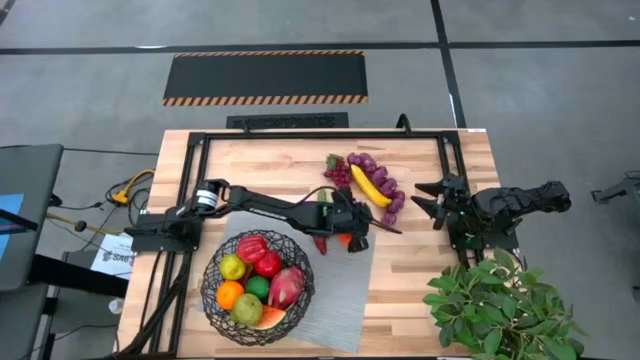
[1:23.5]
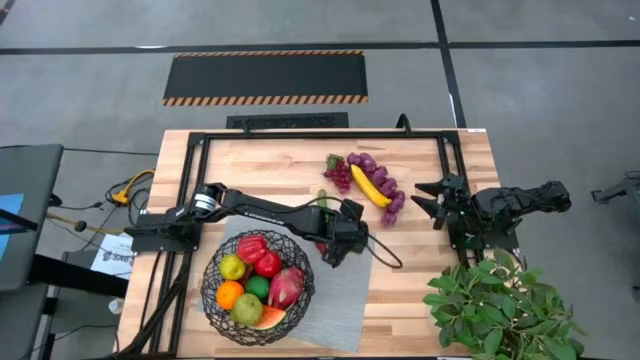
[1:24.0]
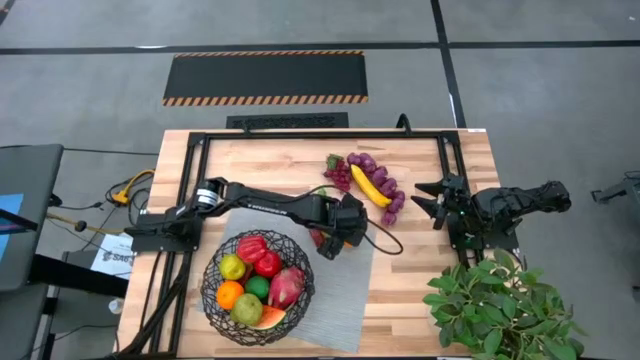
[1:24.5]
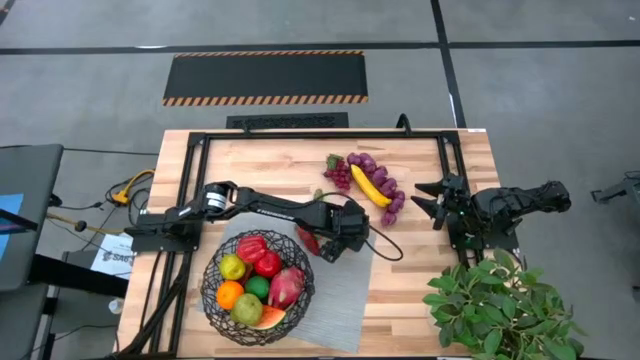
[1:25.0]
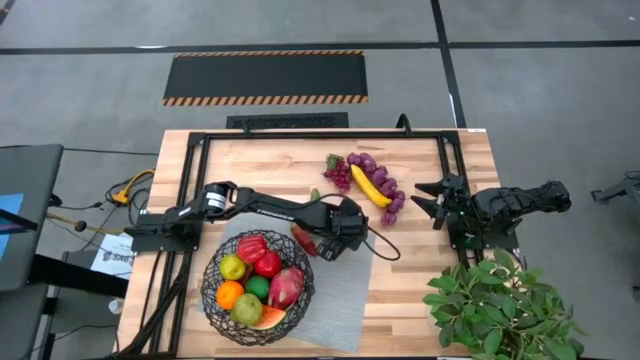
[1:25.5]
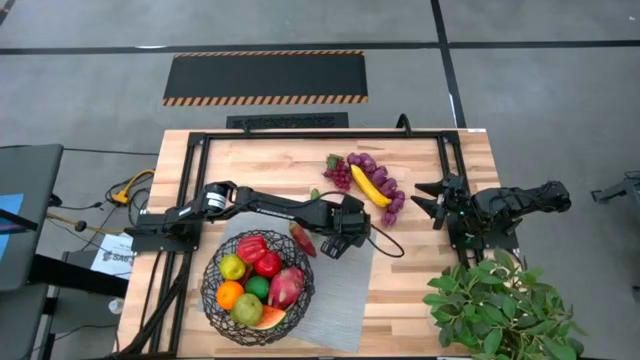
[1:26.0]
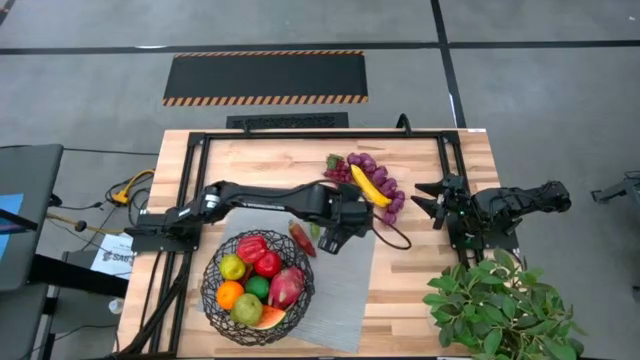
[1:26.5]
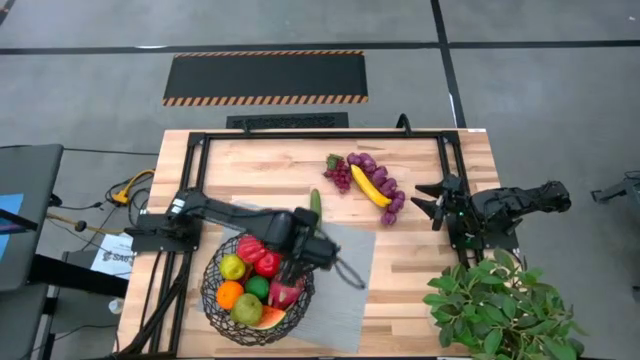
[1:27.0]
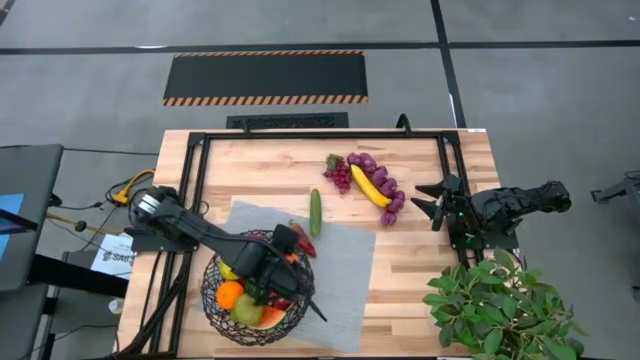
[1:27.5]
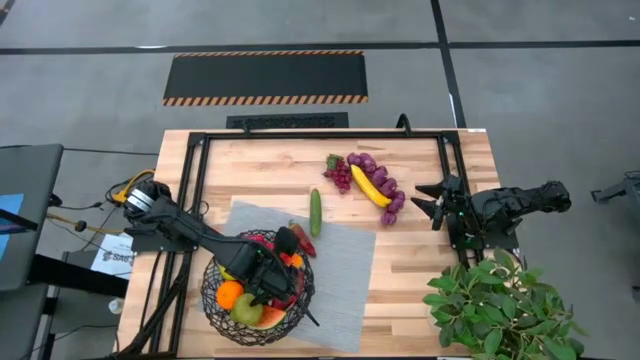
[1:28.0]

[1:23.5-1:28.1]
Task: Build produce basket
Put the orange mango into the mesh basket

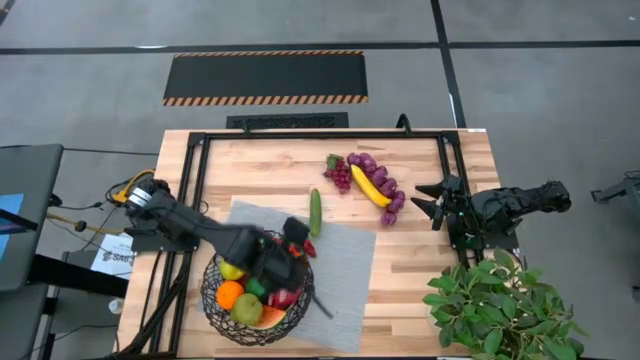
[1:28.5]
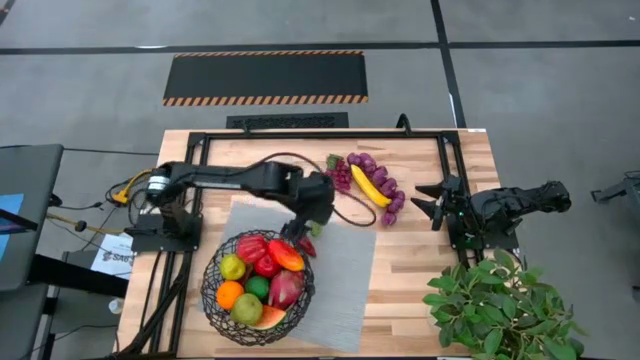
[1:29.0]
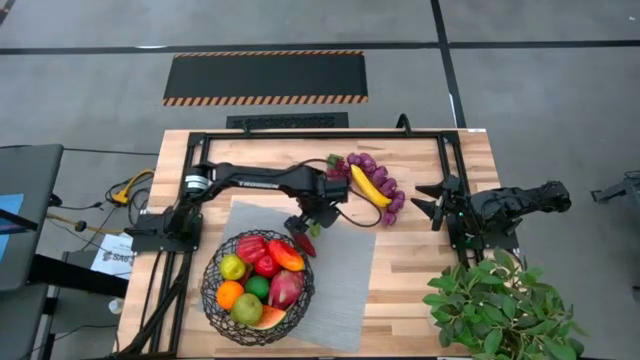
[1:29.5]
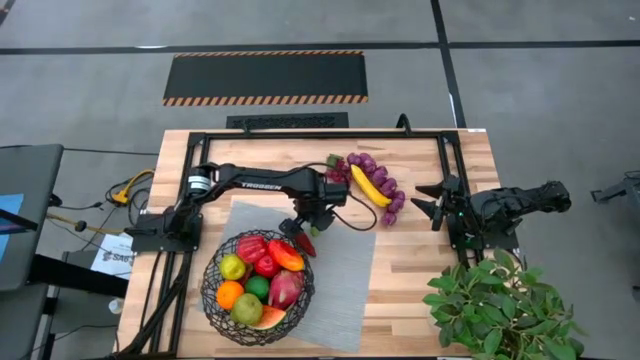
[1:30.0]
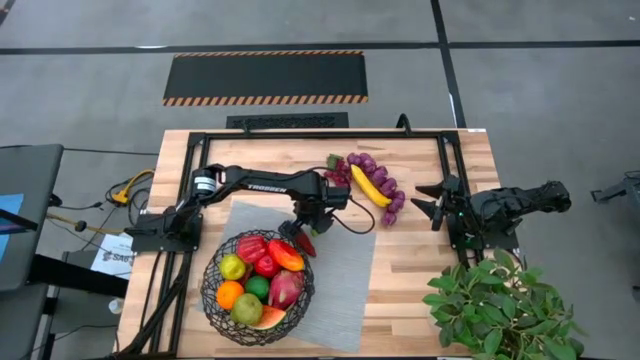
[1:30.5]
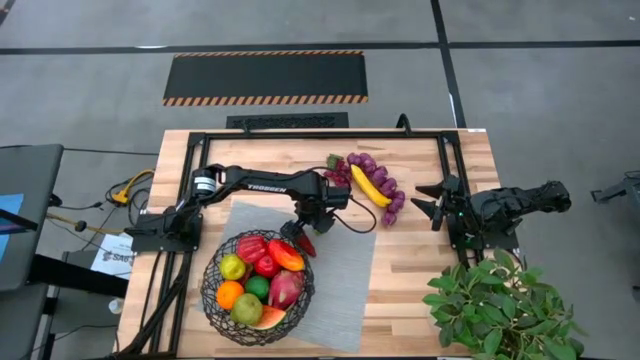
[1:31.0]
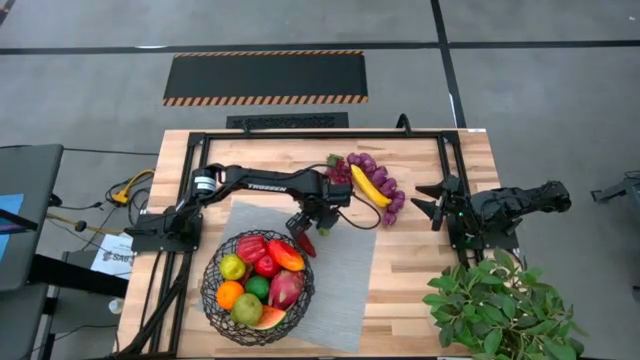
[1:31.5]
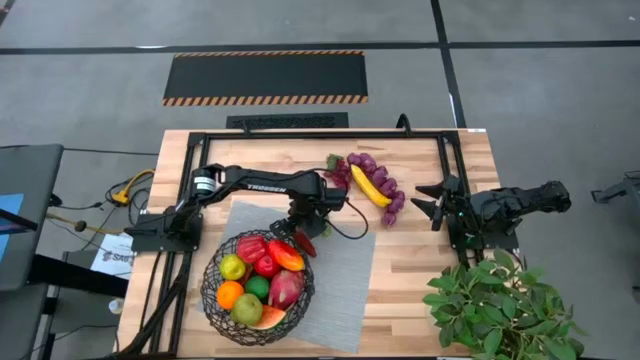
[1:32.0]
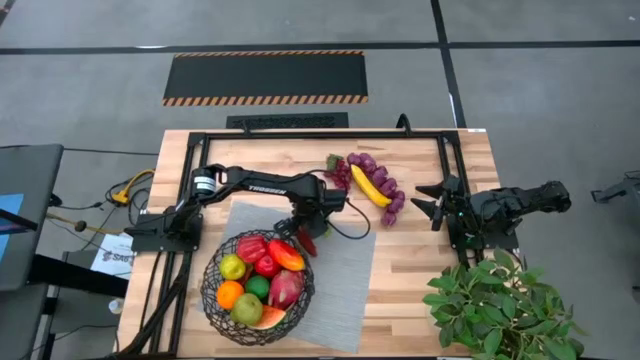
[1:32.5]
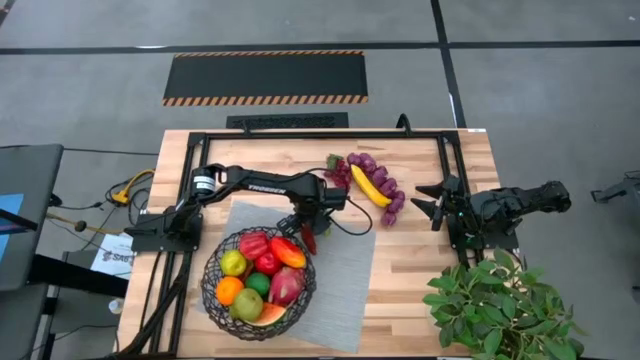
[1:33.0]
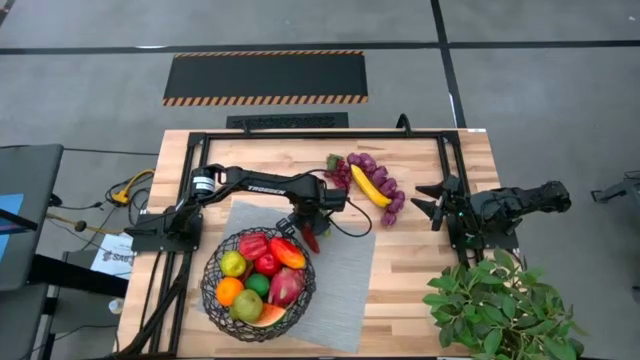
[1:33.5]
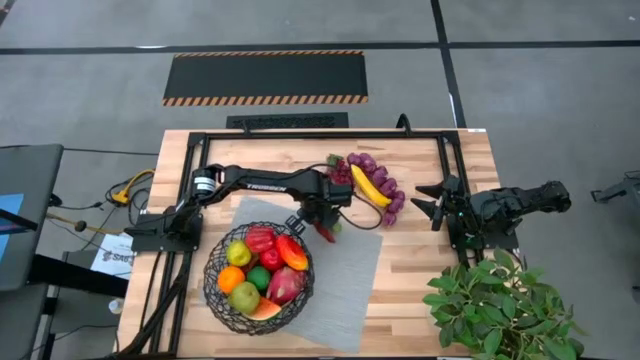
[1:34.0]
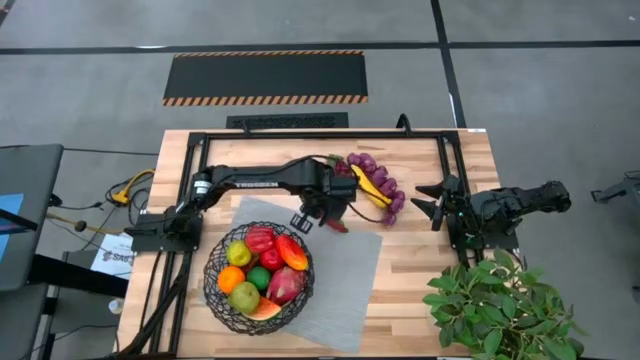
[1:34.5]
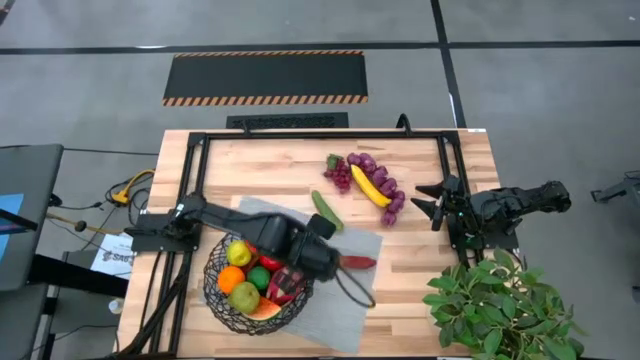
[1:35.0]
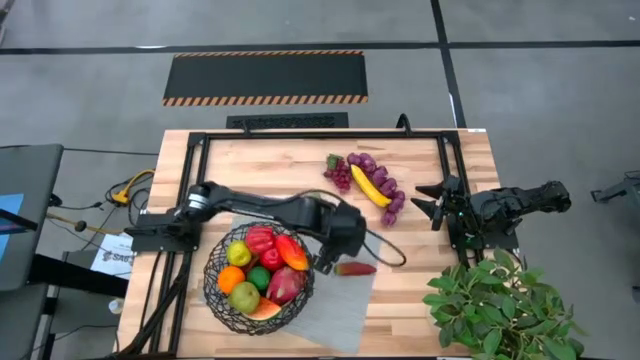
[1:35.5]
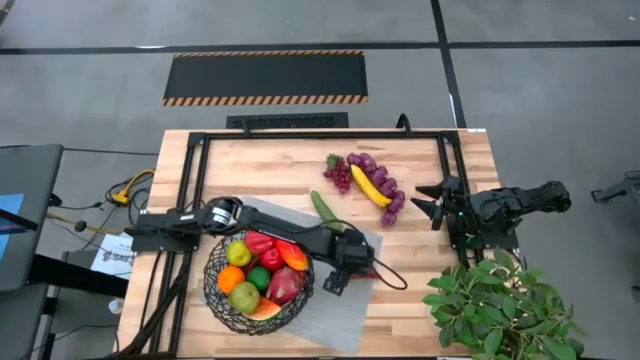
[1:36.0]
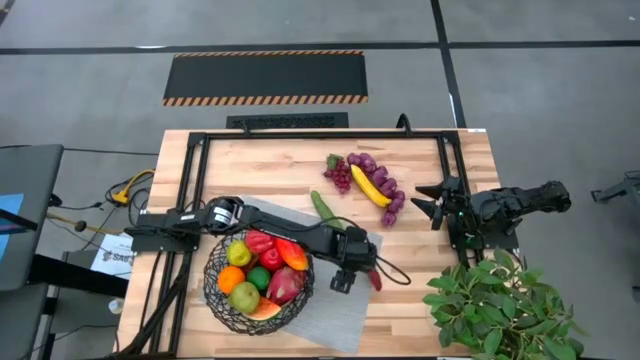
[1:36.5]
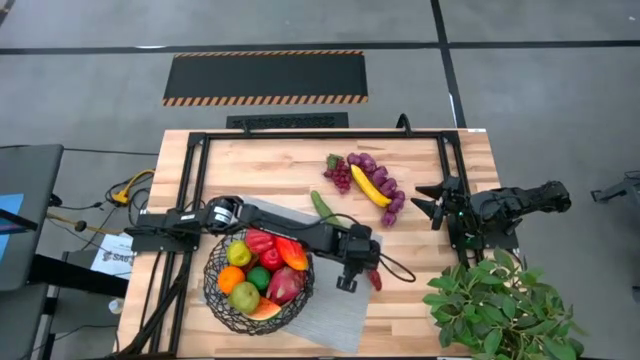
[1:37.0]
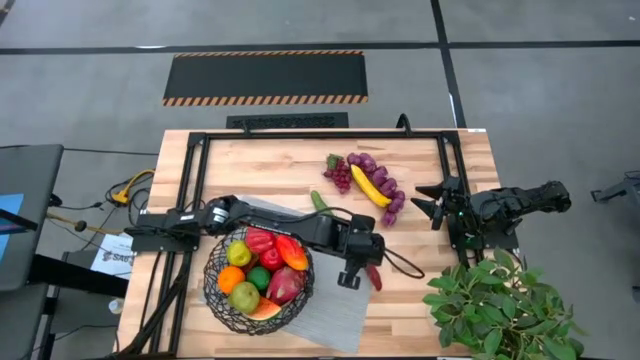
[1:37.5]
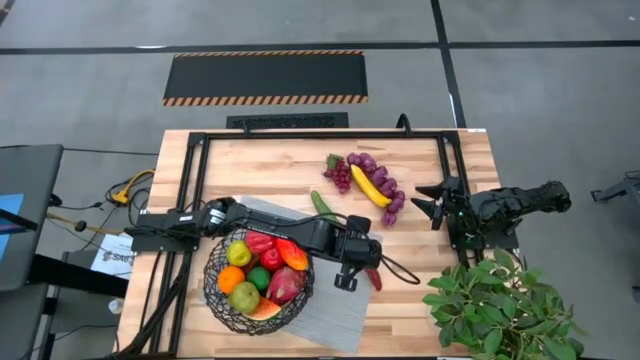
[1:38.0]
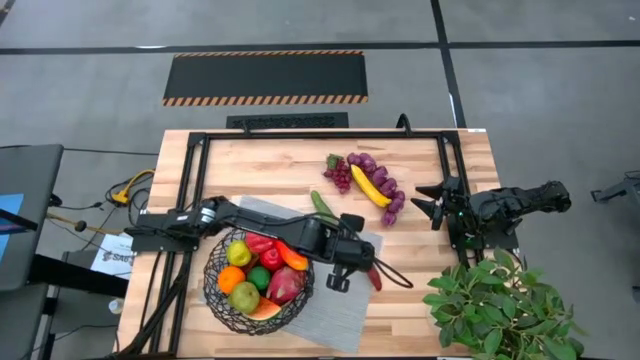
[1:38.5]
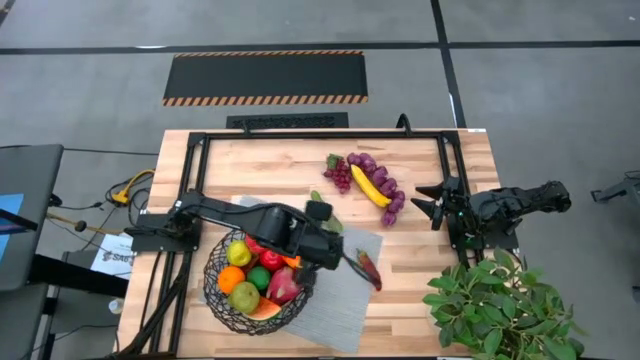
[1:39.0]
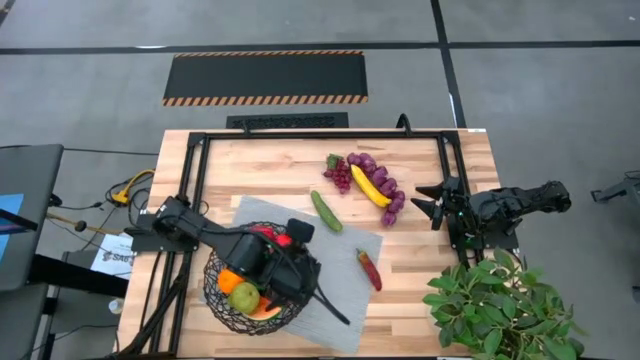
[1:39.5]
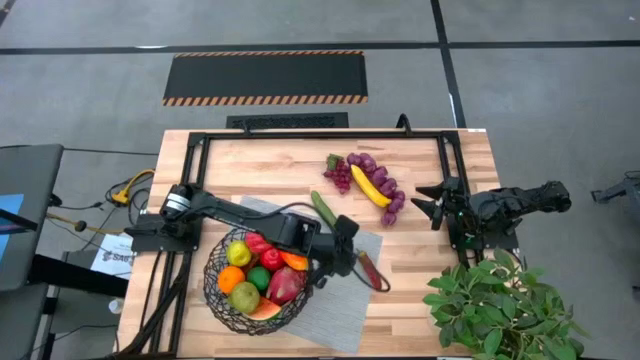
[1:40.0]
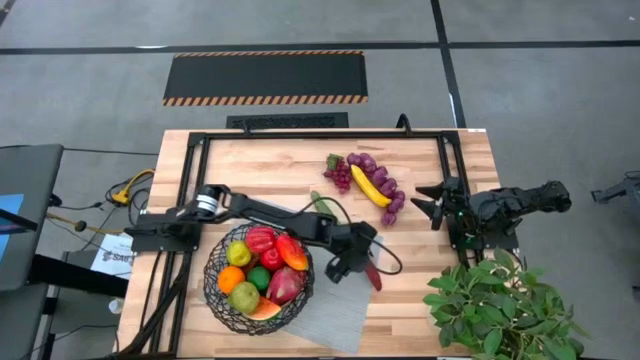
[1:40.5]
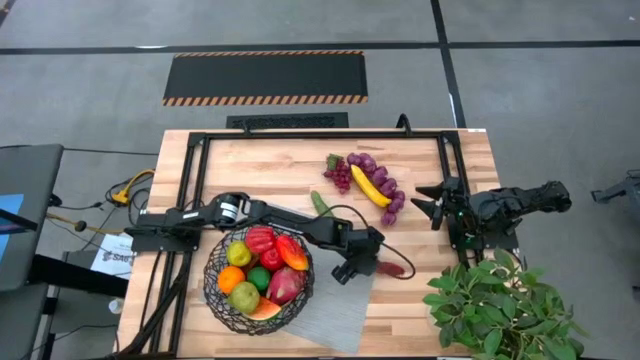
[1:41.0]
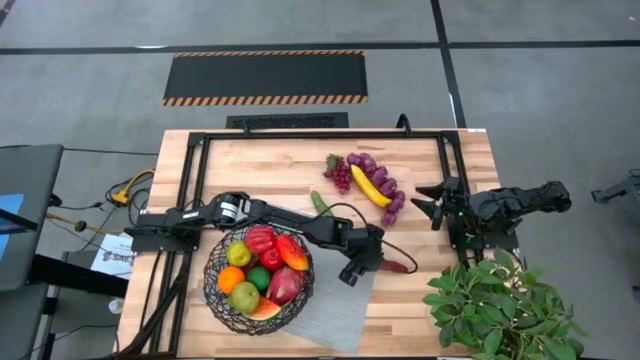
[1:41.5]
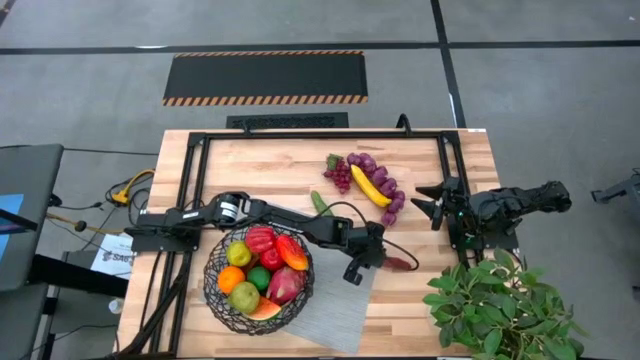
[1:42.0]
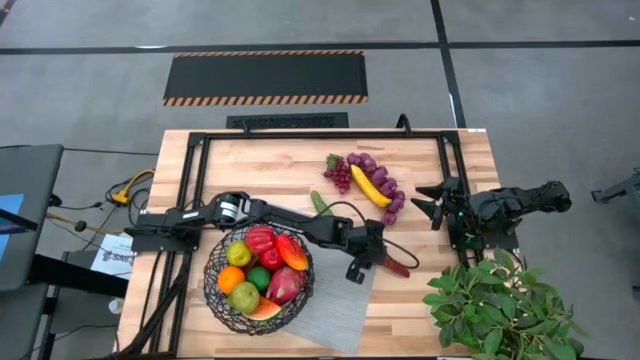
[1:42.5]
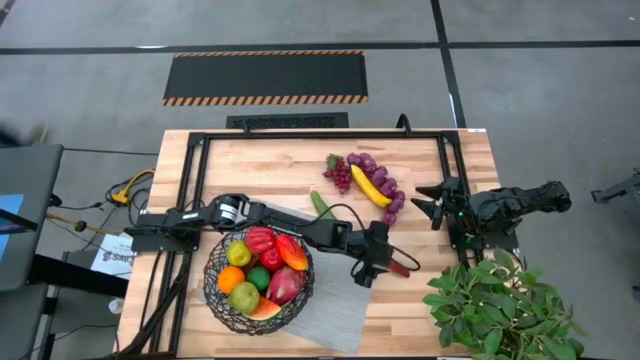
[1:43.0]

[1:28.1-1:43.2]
Put the red chili pepper into the mesh basket

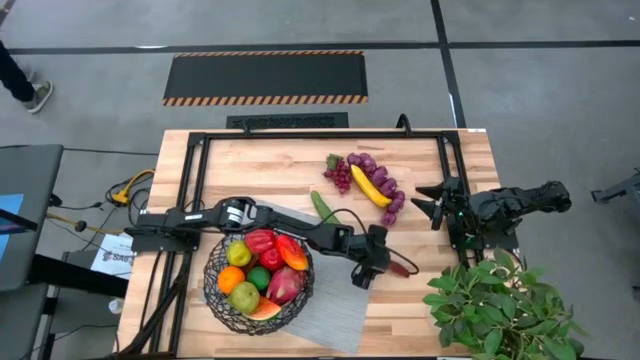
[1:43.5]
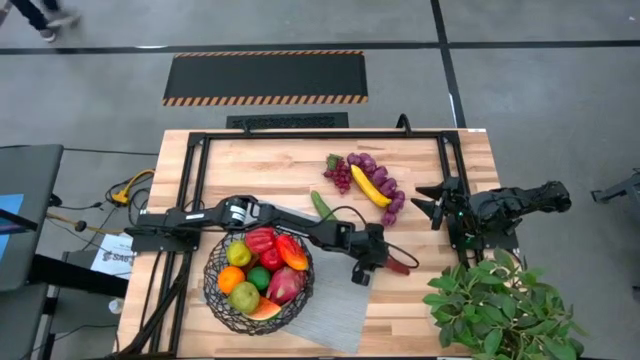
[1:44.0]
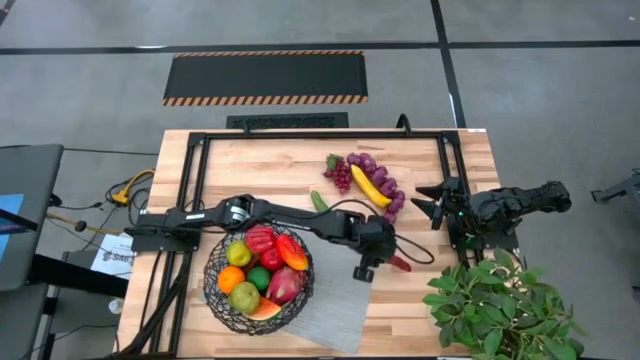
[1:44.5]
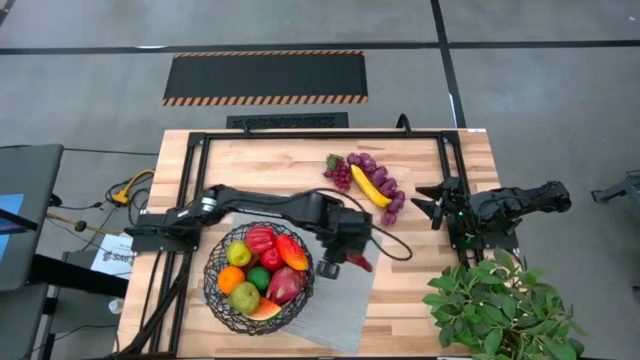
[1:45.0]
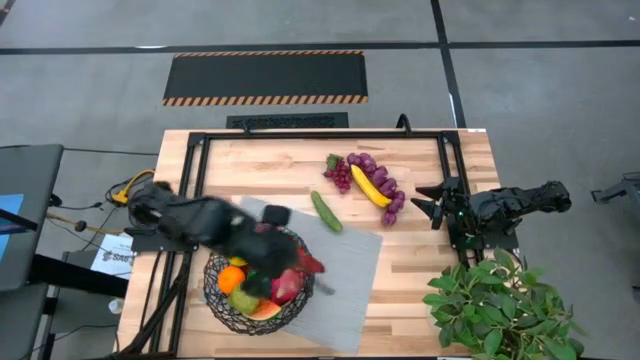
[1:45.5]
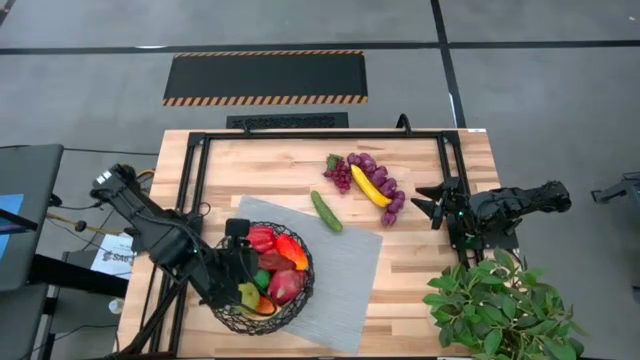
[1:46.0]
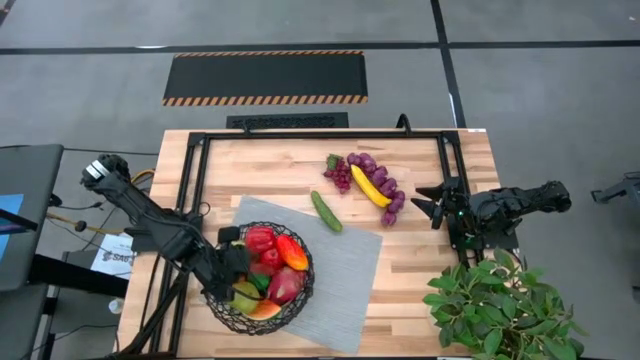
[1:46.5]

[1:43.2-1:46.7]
Put the red chili pepper into the mesh basket
